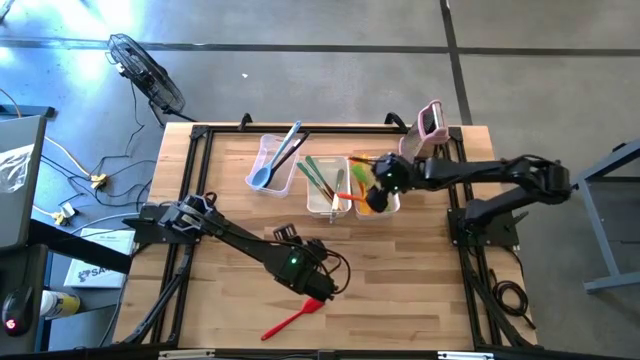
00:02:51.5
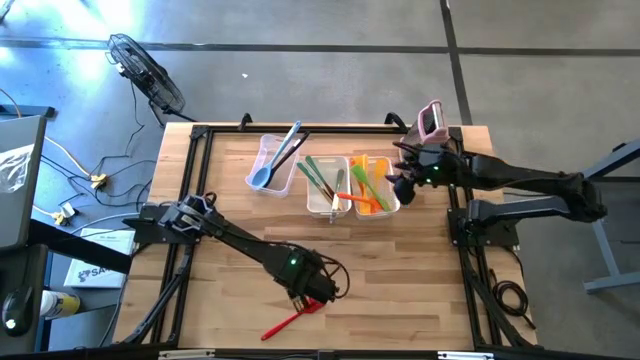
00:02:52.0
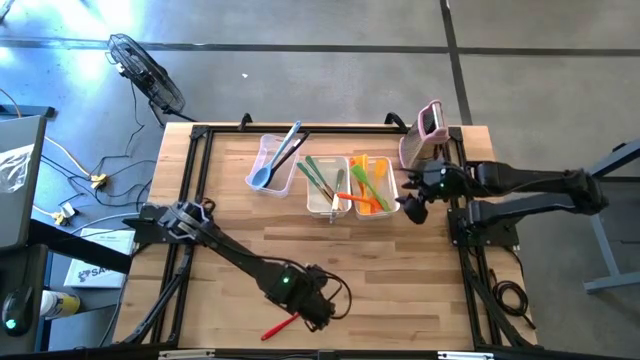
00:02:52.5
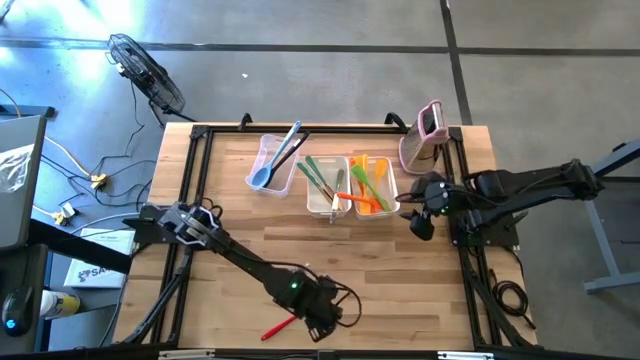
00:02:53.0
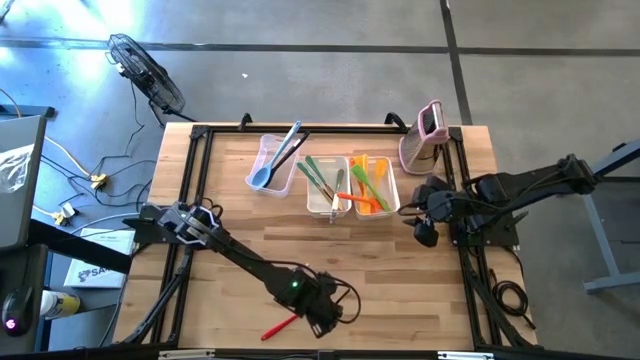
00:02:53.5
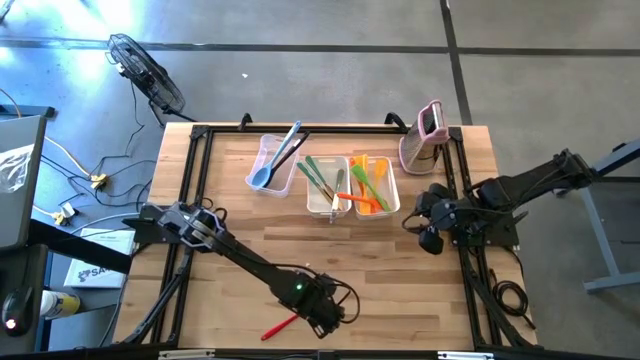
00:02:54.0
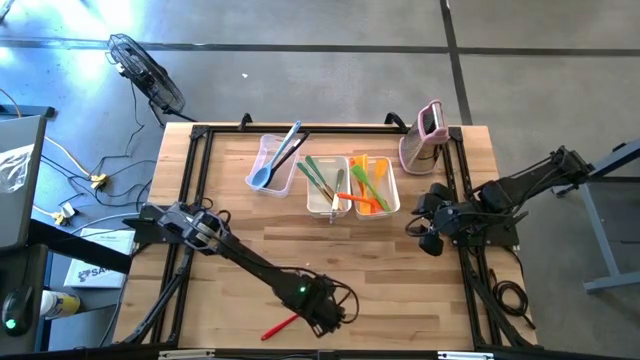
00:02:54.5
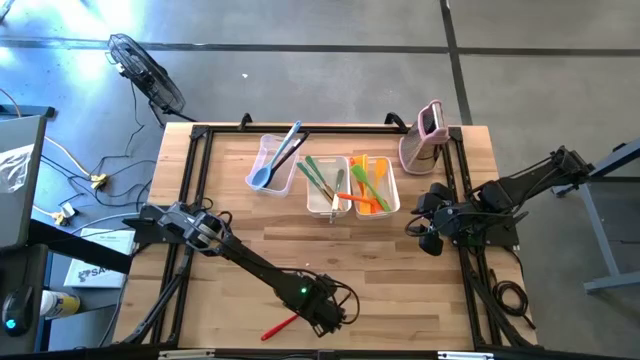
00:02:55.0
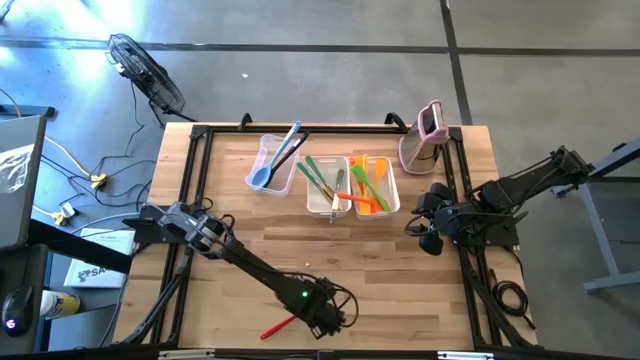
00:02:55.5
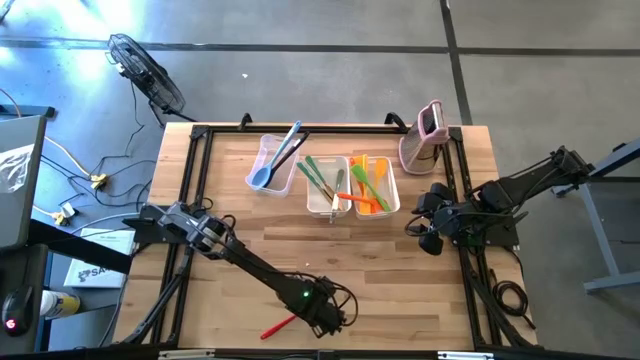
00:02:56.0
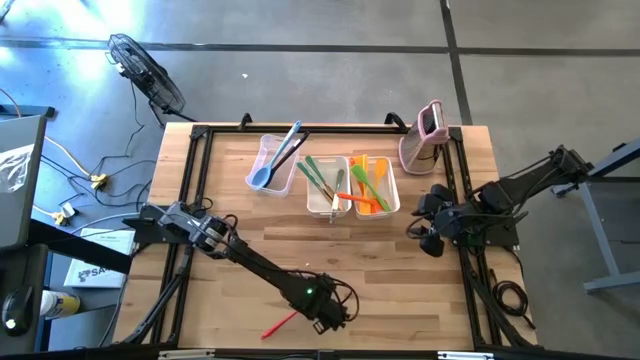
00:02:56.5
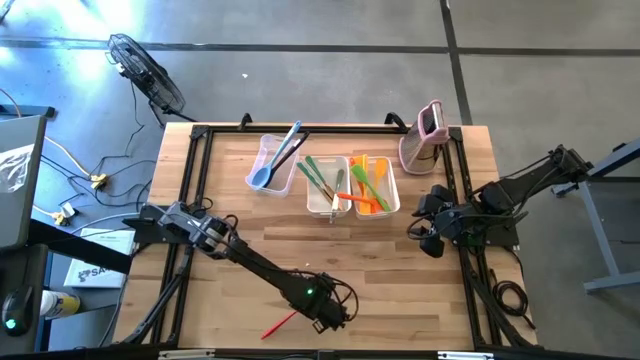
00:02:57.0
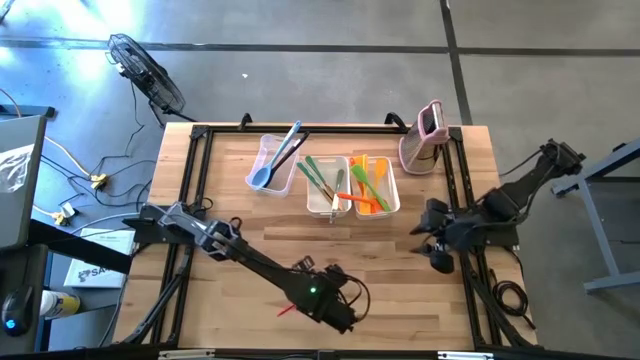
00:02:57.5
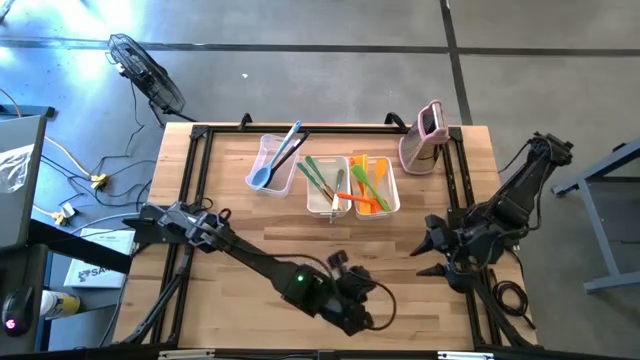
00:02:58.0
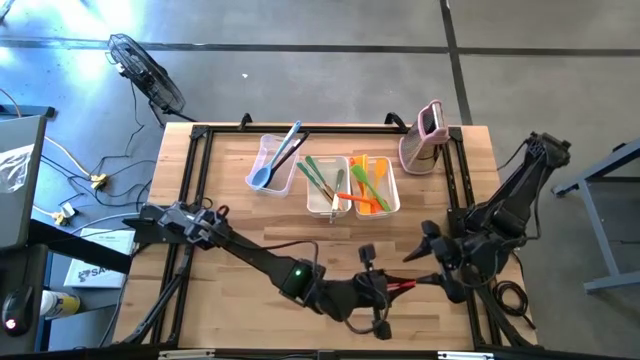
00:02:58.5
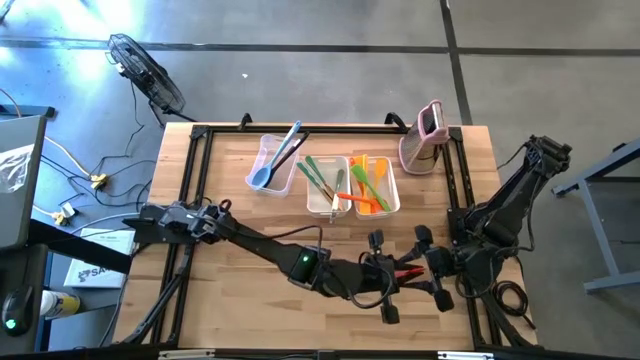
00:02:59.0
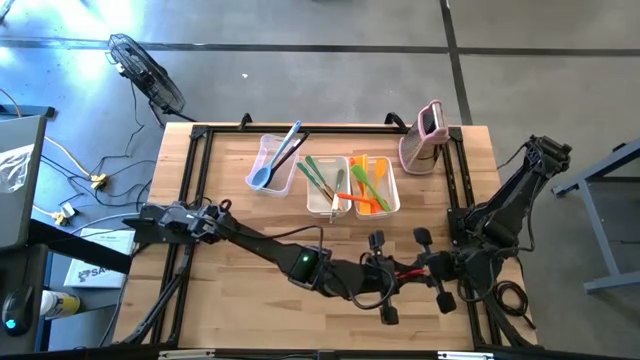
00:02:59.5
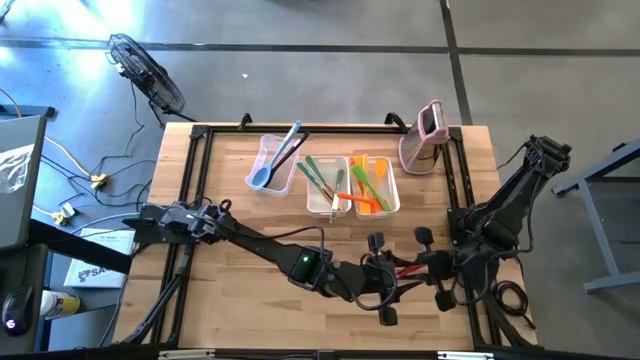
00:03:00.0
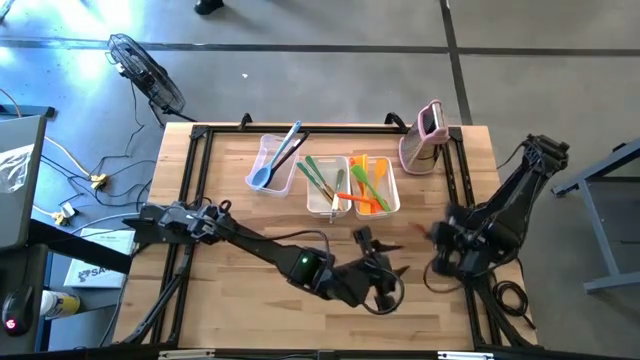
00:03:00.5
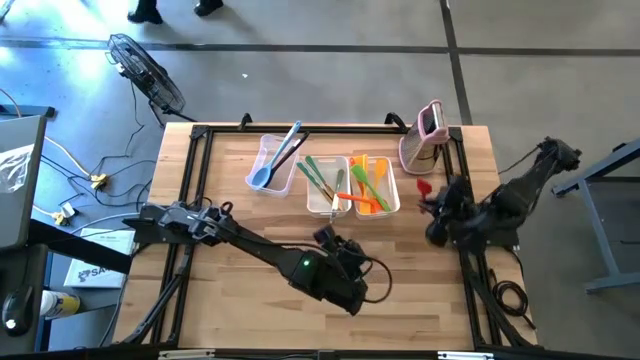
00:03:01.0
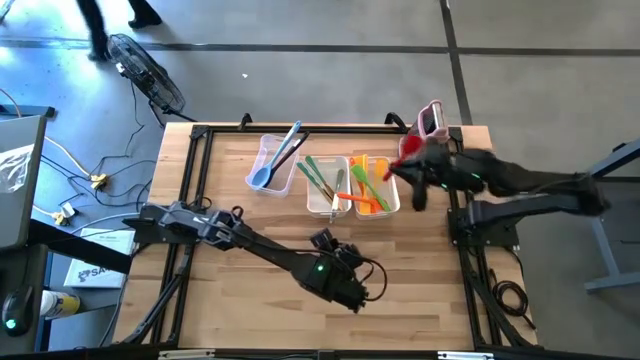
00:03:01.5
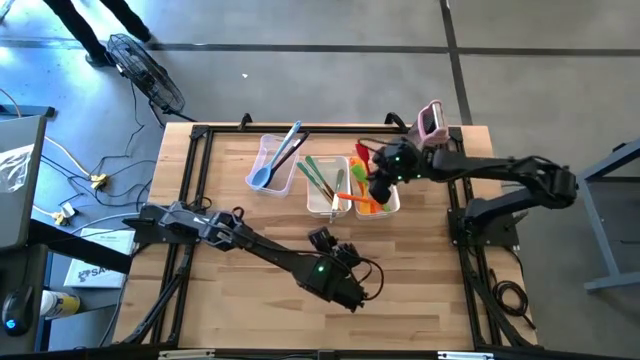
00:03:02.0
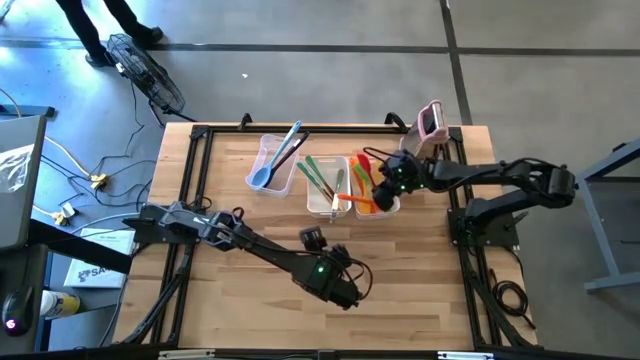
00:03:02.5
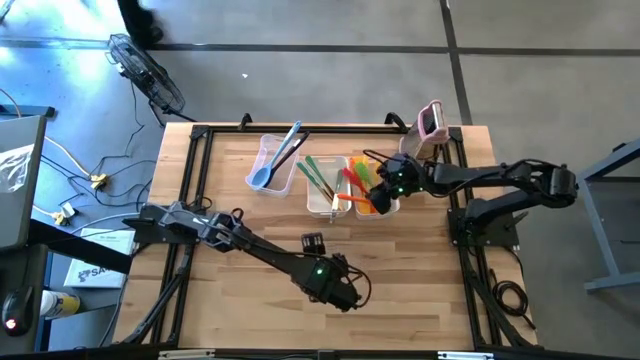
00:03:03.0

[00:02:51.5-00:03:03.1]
Task: Pick & Place Kitchen Items
Put the red spatula into the right white bin

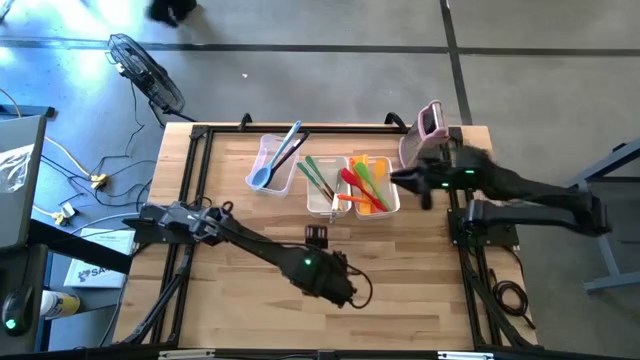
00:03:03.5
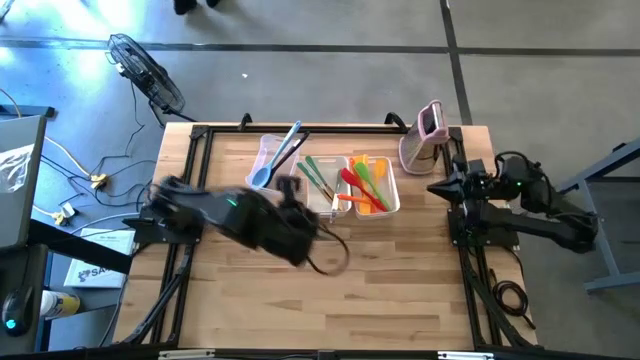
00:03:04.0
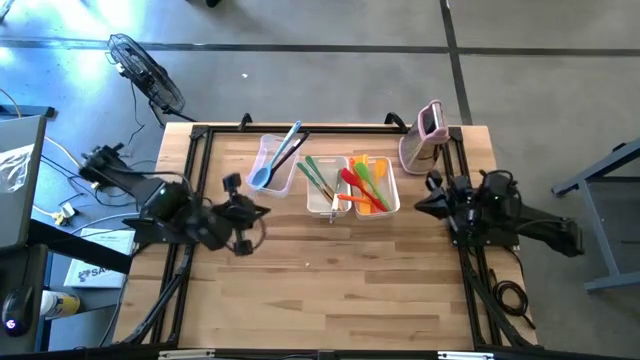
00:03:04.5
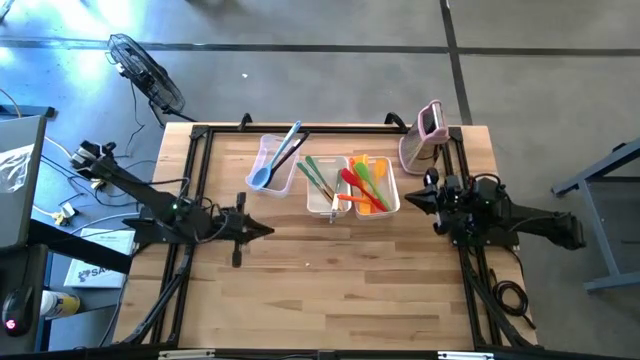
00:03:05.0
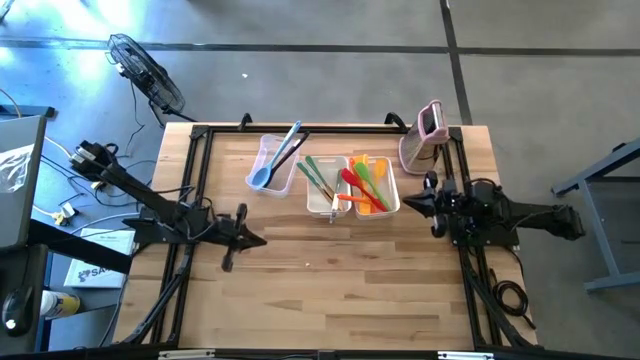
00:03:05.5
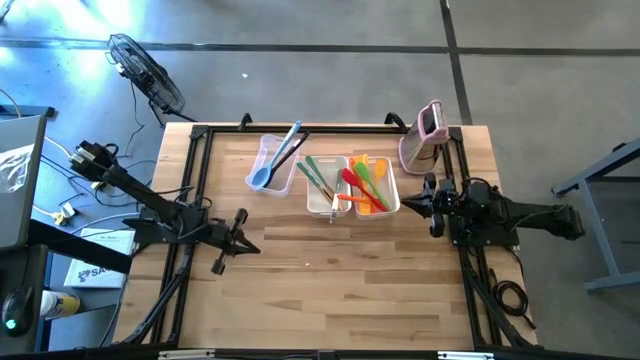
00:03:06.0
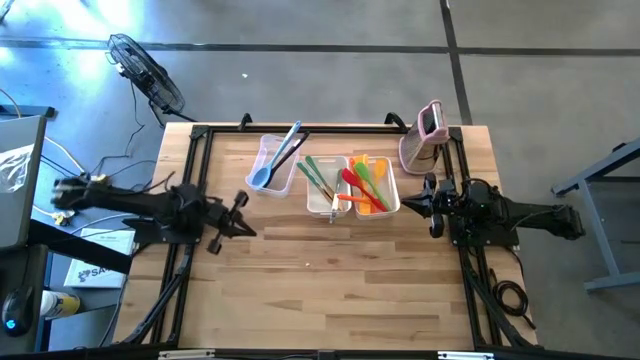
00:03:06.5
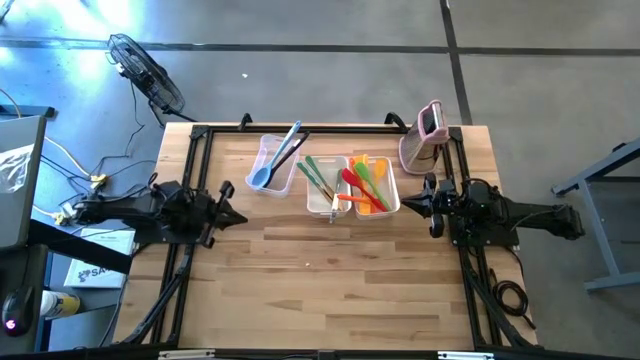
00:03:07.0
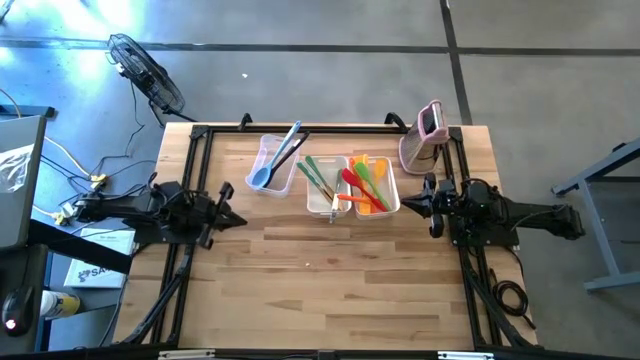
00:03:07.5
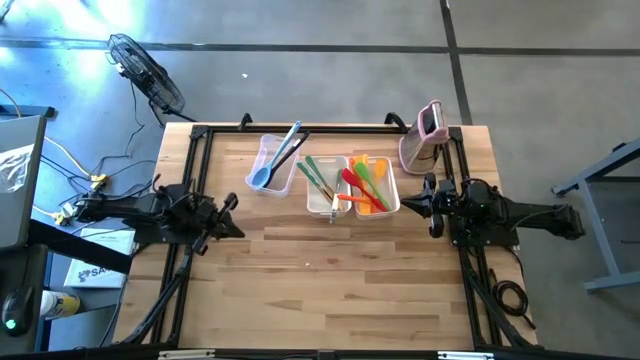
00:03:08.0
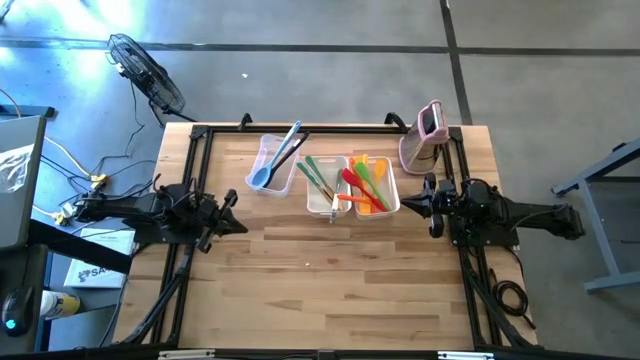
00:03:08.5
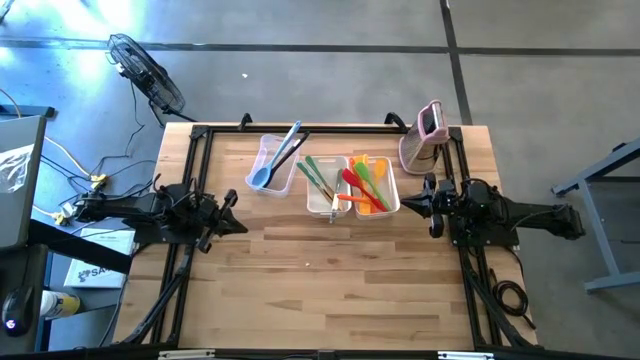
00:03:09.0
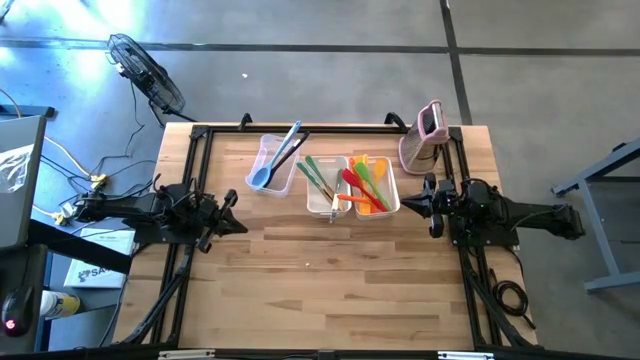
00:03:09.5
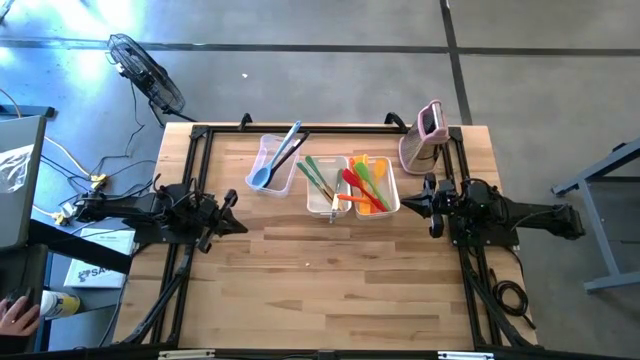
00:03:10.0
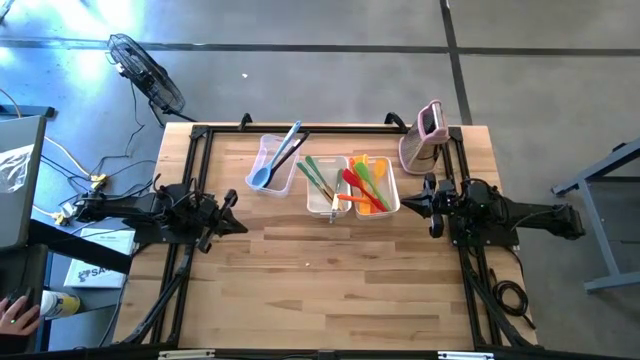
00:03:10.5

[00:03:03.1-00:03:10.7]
Return to Home Position
